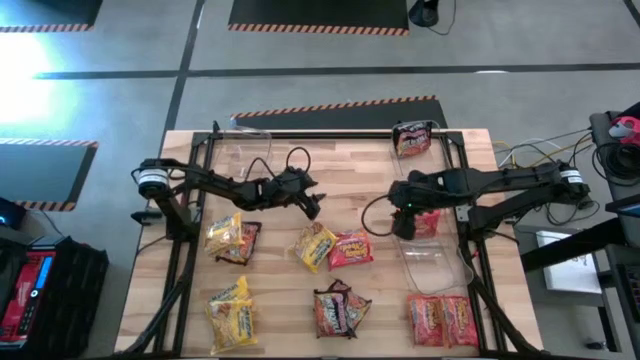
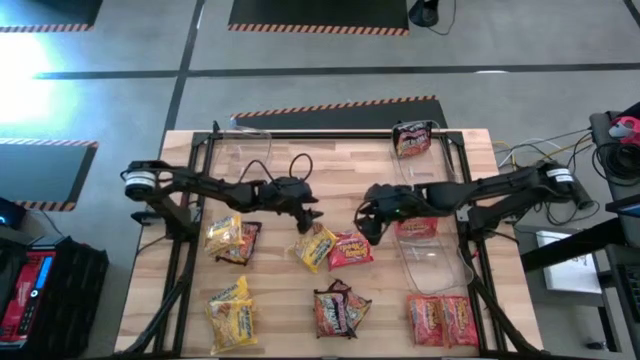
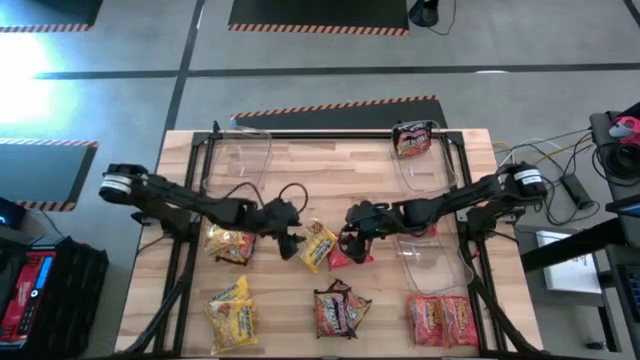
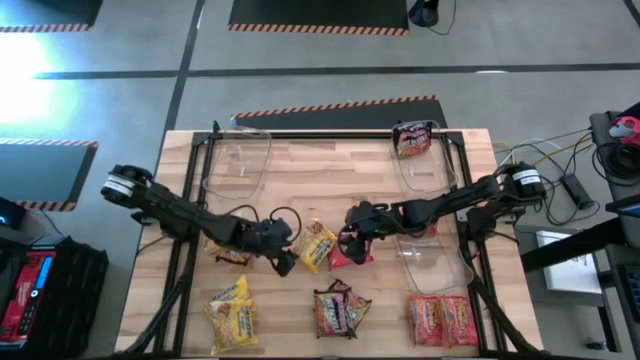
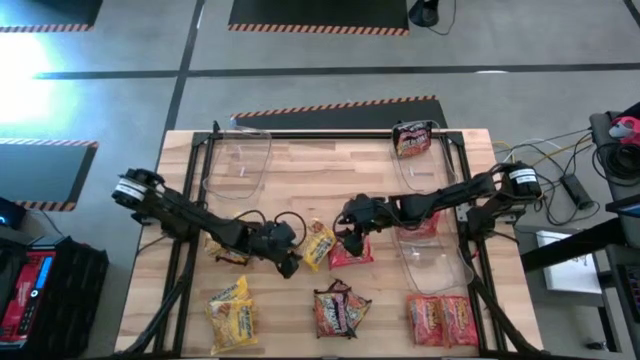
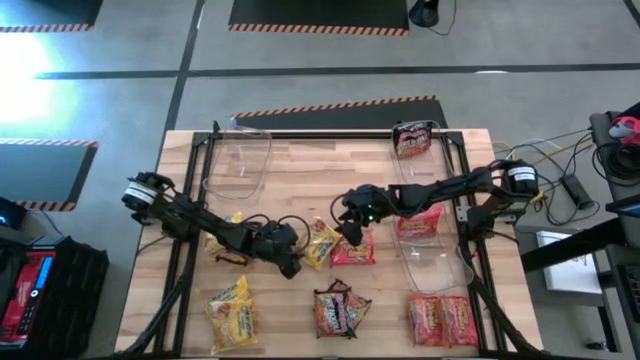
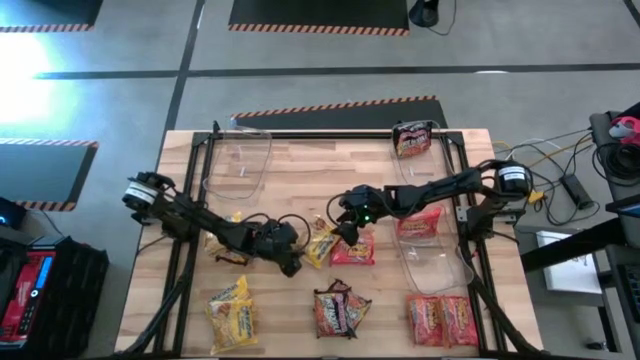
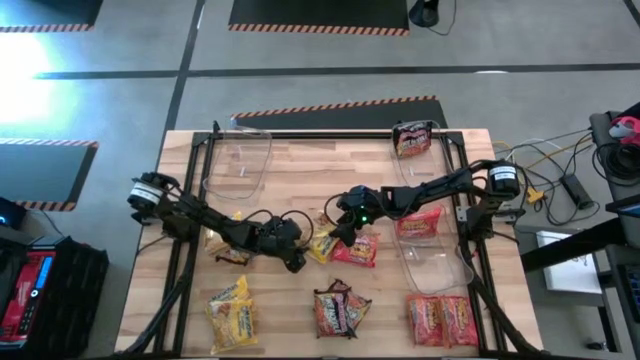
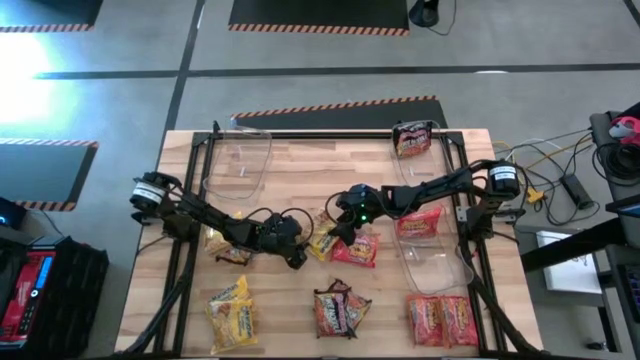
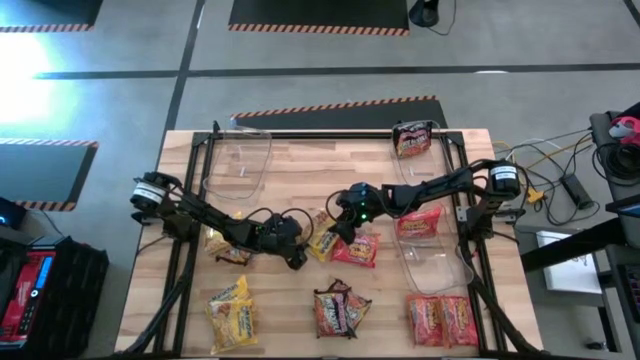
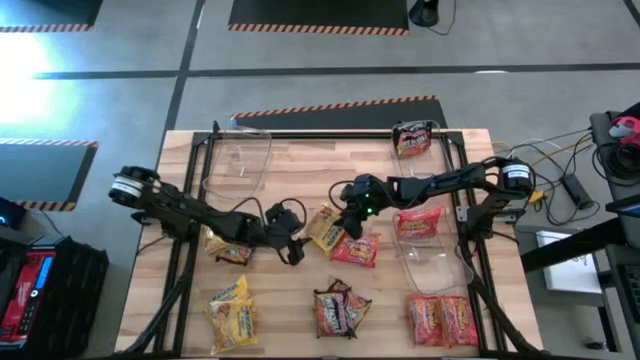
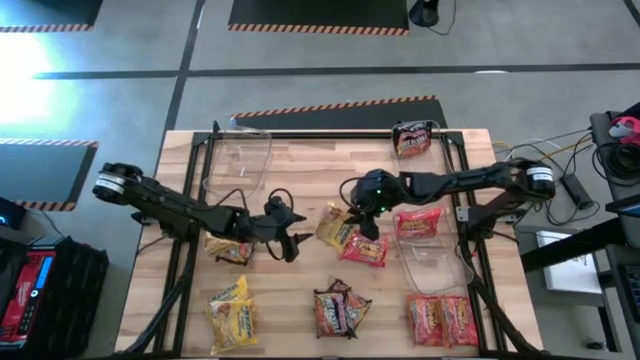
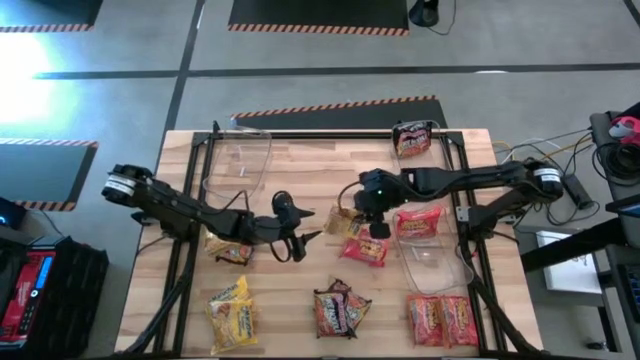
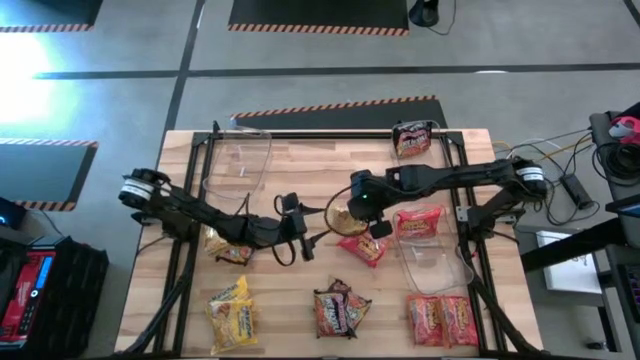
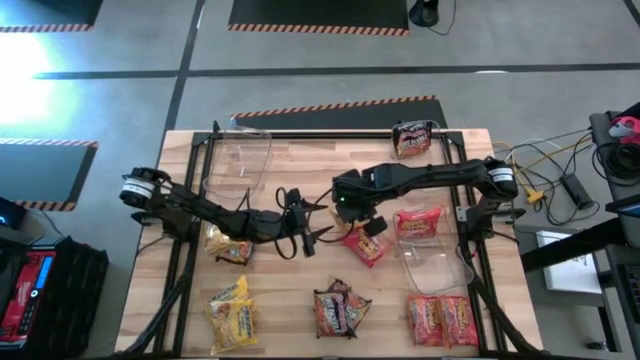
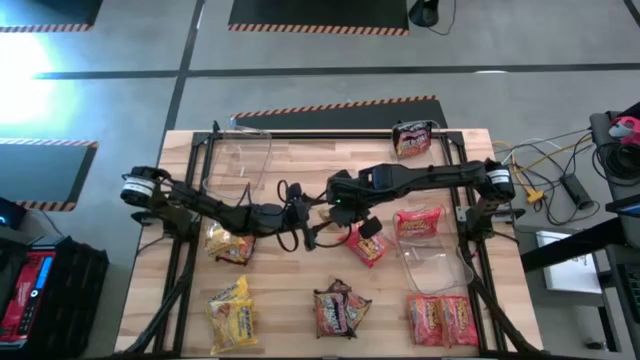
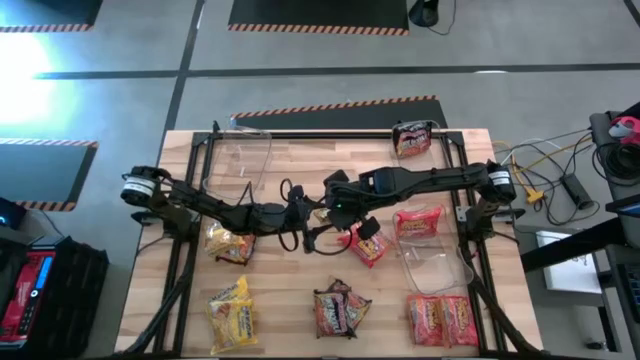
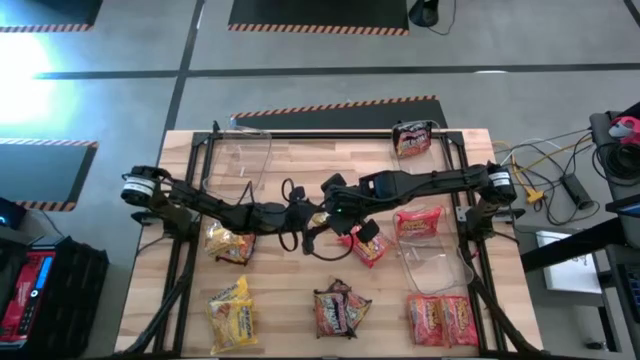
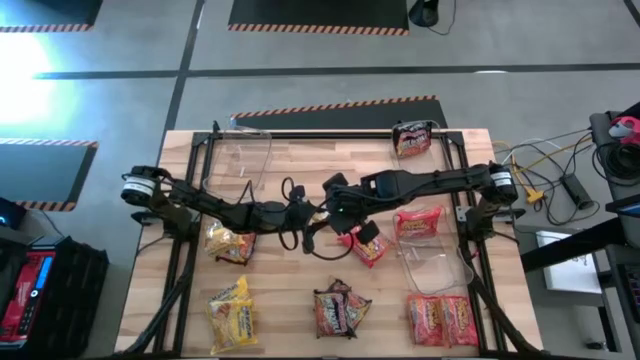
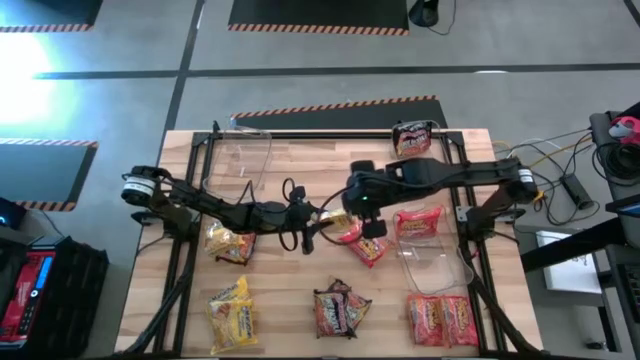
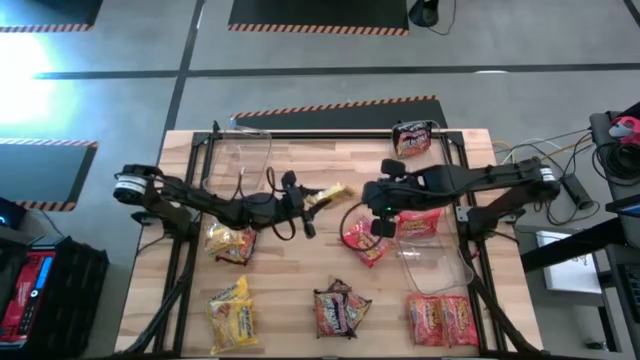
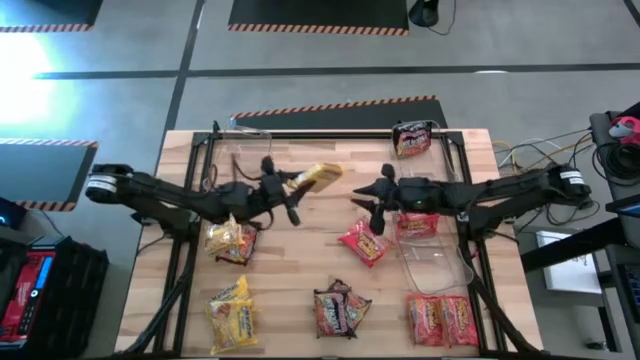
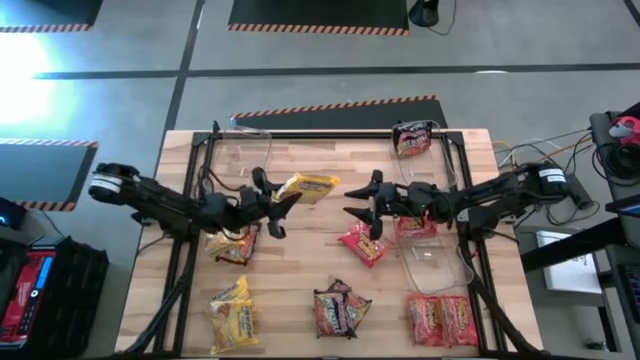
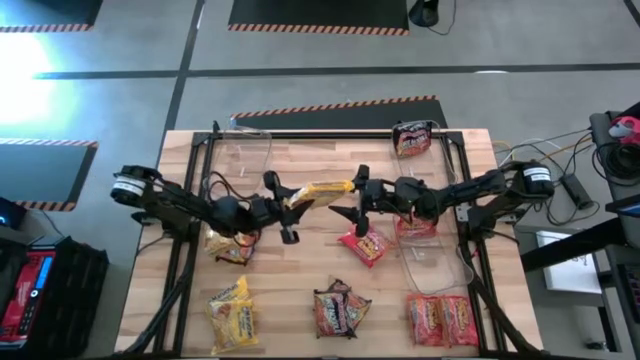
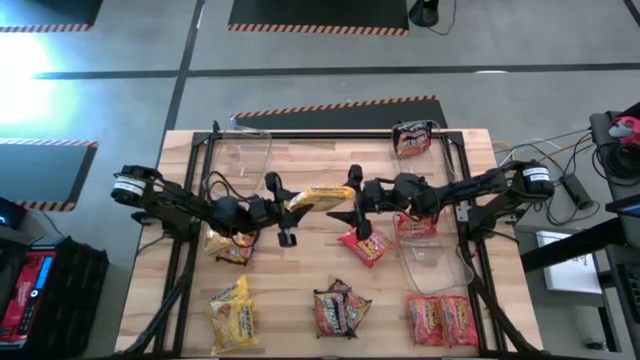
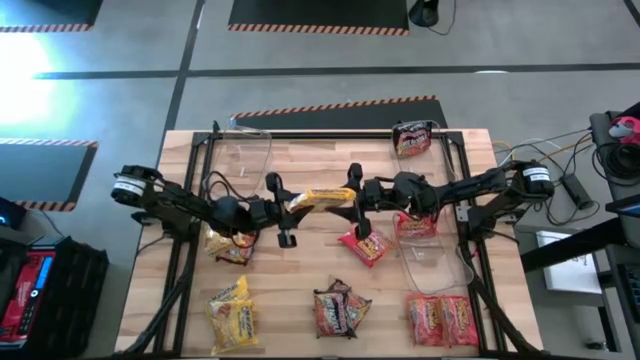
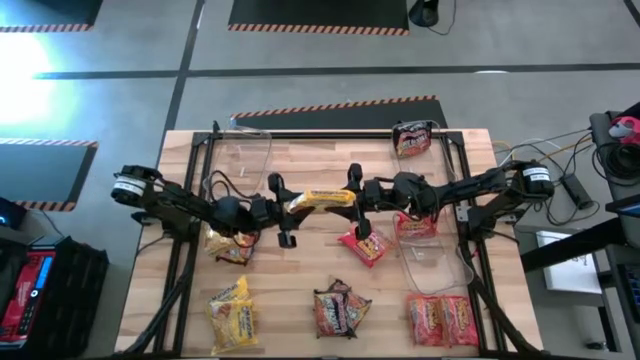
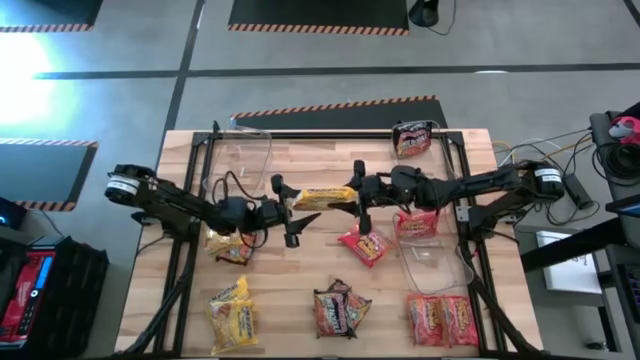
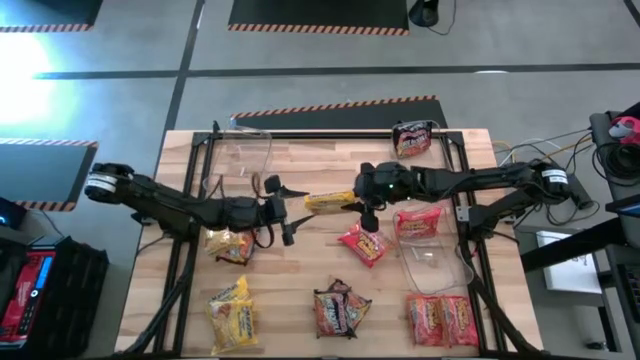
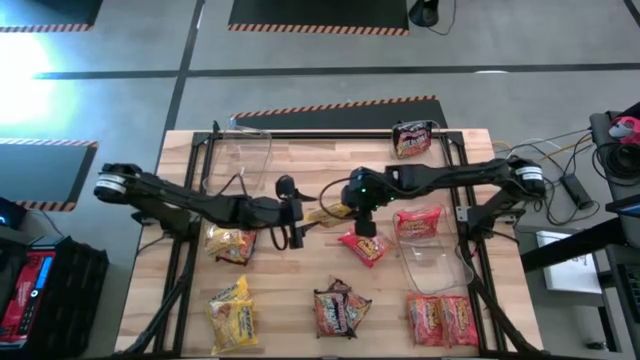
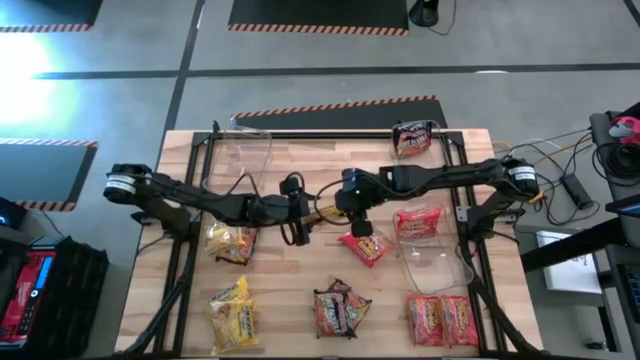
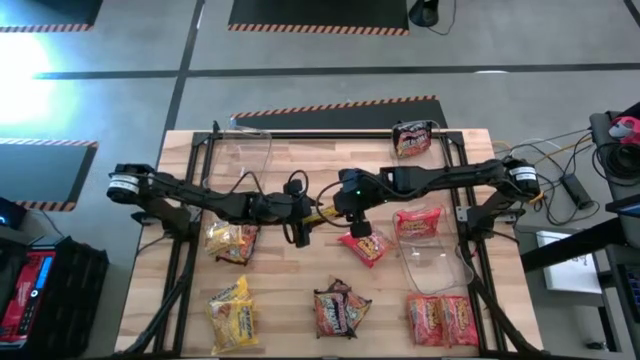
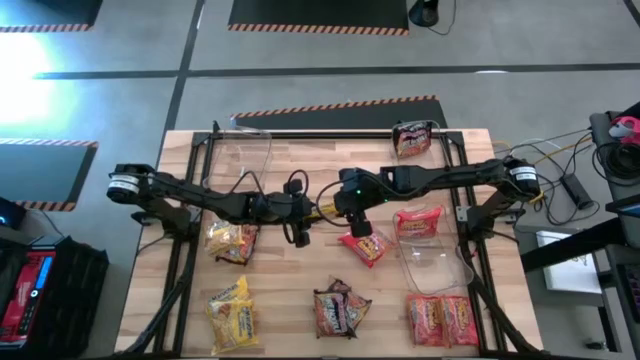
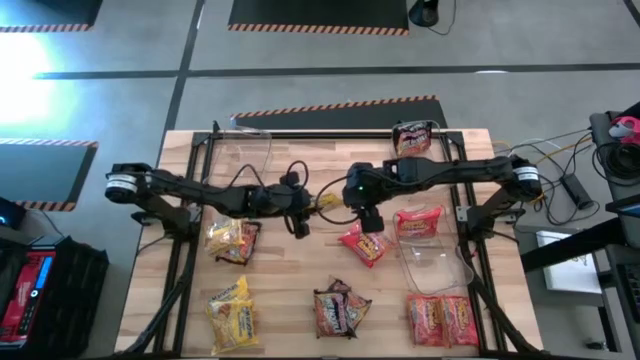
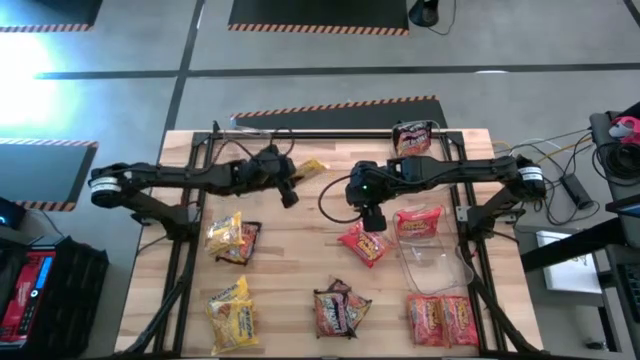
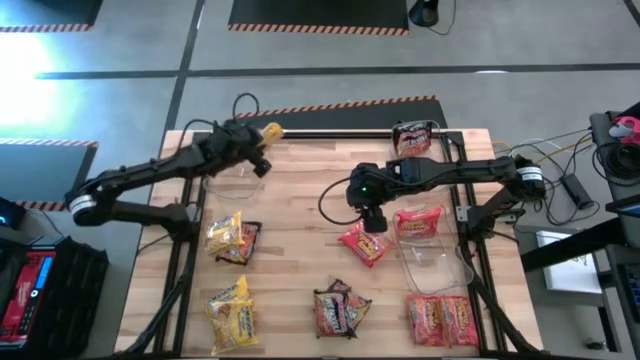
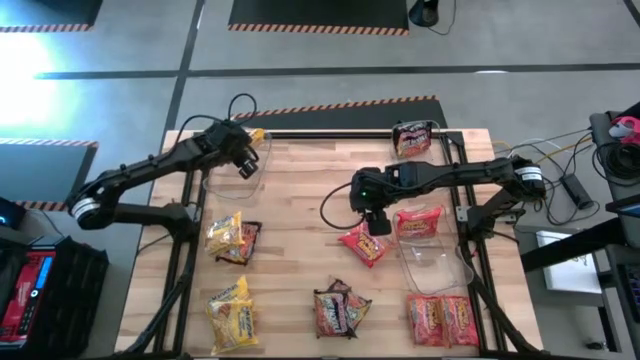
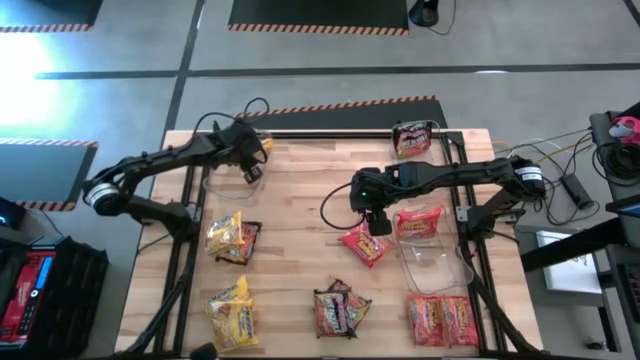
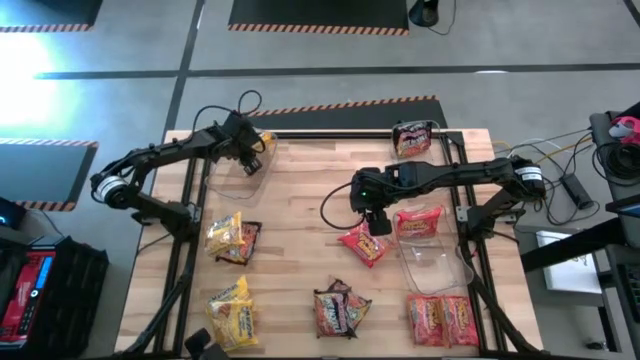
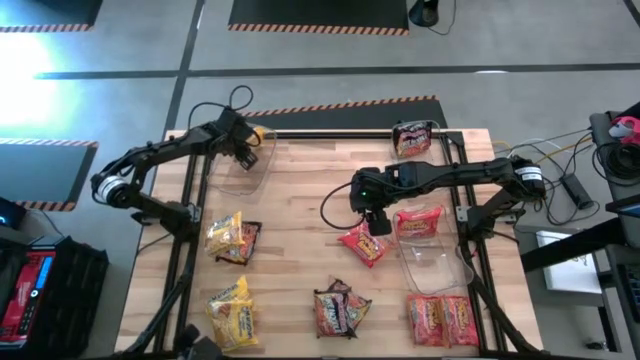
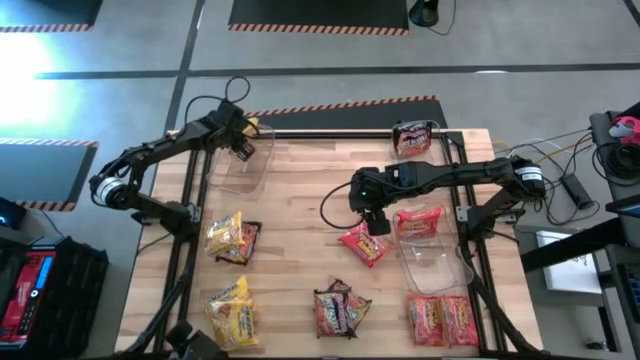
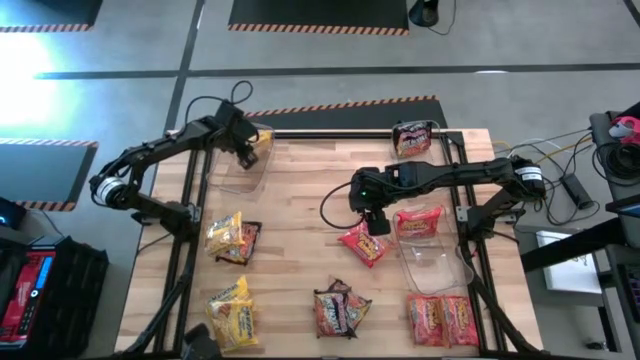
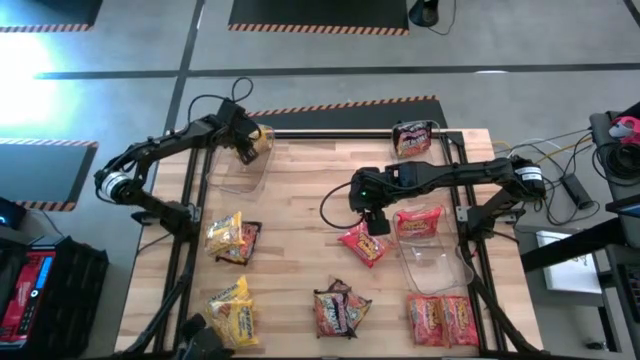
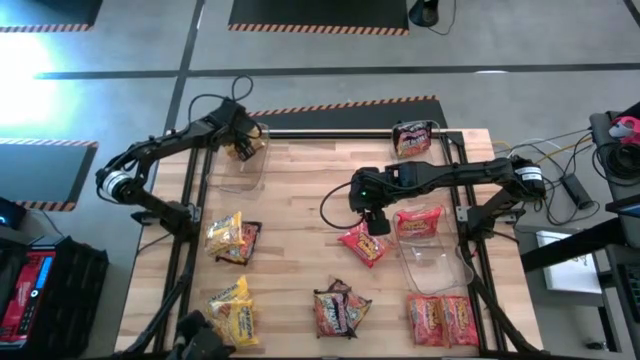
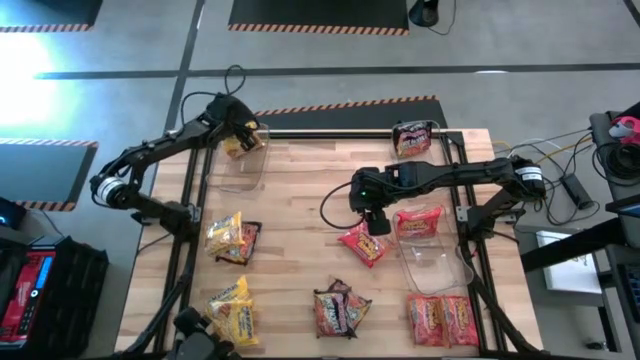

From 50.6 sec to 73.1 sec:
Task: Sort Maruchan noodles
Put the yellow noodle pack into the top left transparent bin
